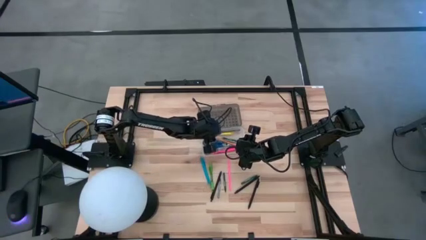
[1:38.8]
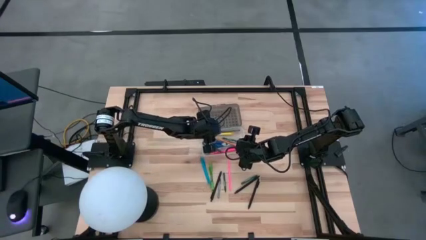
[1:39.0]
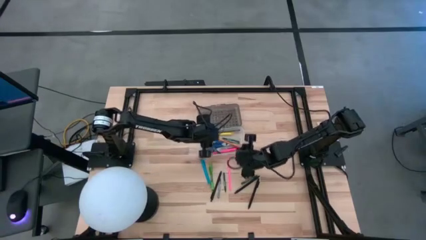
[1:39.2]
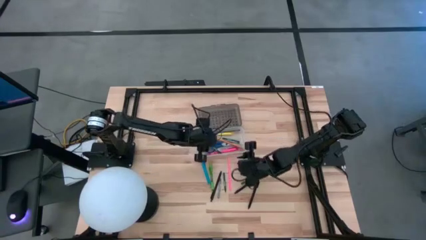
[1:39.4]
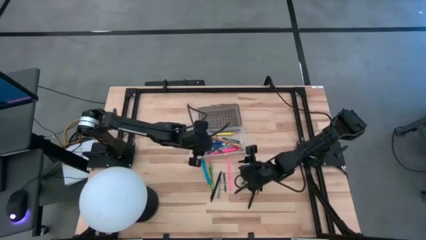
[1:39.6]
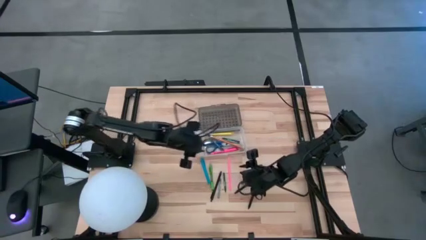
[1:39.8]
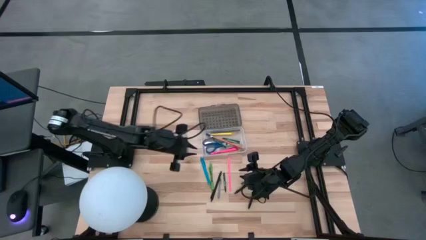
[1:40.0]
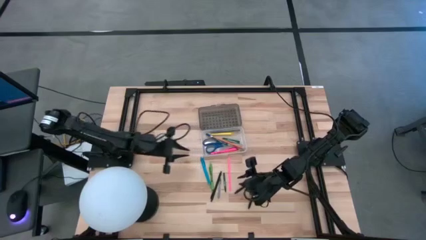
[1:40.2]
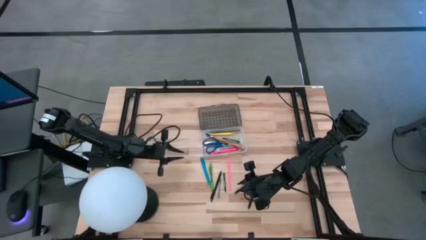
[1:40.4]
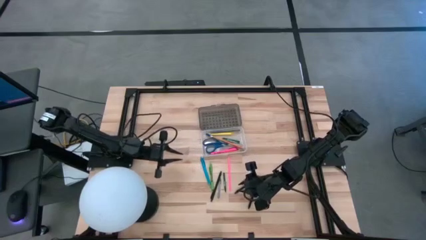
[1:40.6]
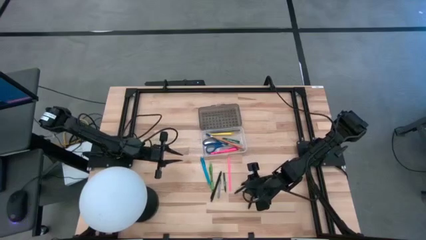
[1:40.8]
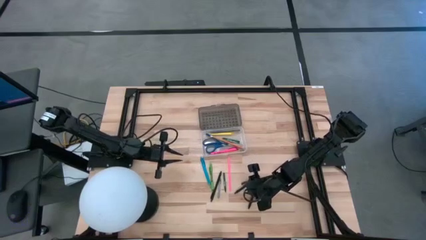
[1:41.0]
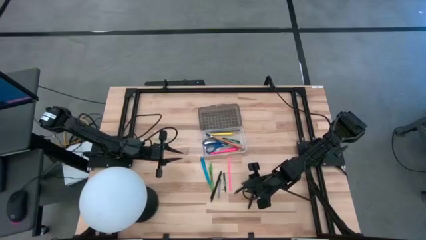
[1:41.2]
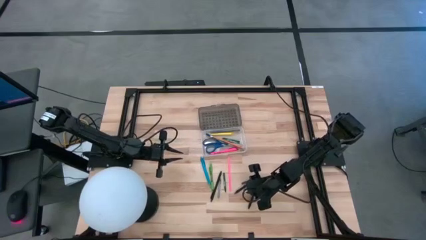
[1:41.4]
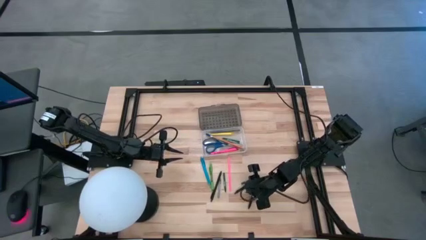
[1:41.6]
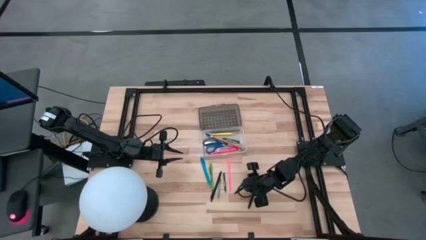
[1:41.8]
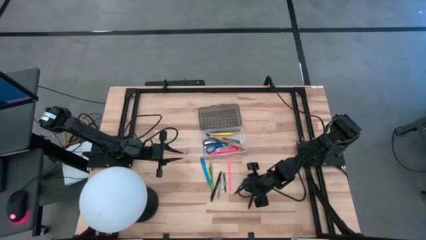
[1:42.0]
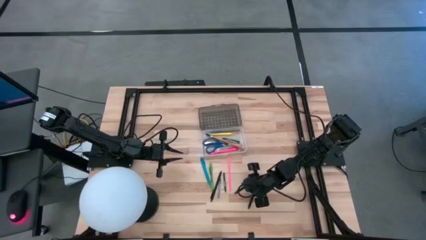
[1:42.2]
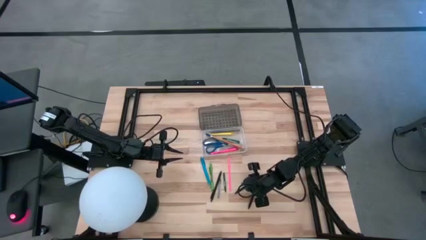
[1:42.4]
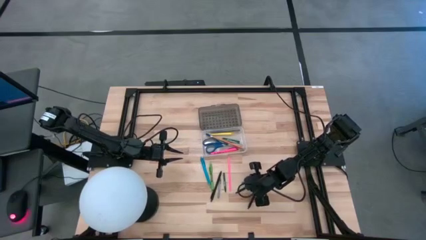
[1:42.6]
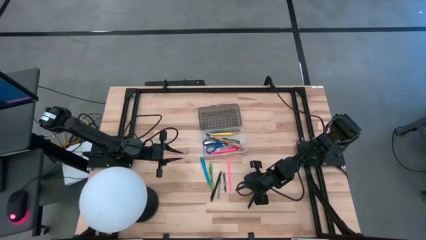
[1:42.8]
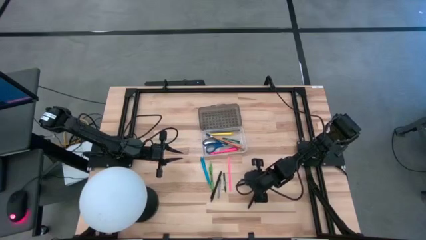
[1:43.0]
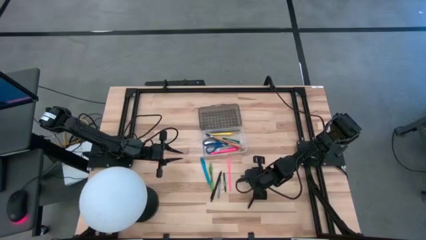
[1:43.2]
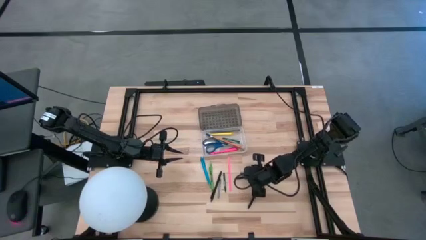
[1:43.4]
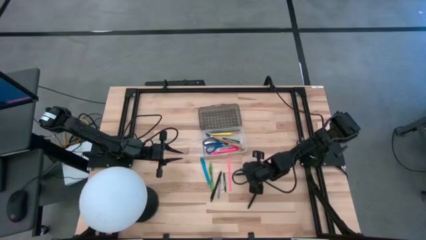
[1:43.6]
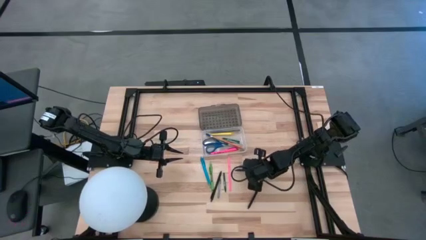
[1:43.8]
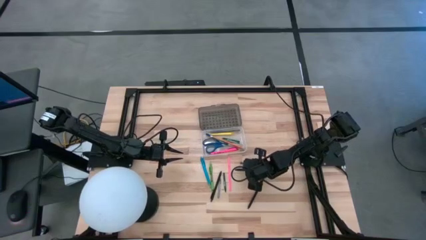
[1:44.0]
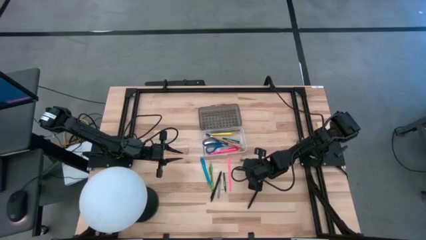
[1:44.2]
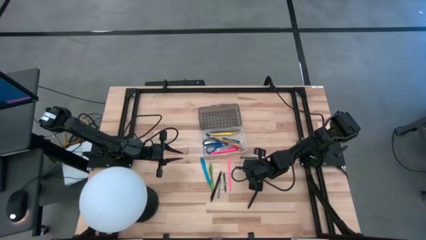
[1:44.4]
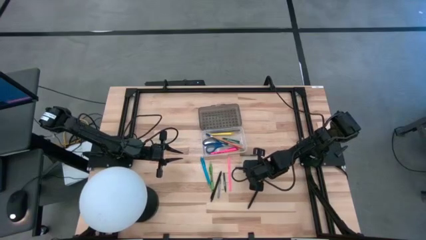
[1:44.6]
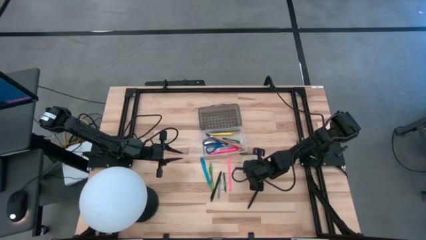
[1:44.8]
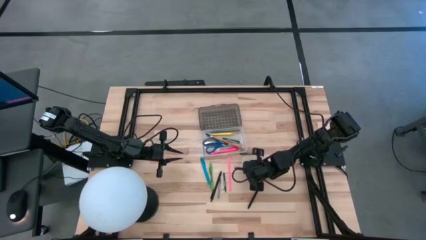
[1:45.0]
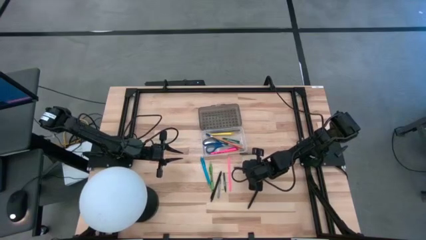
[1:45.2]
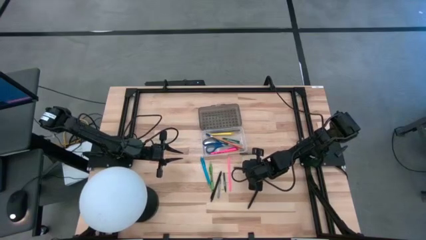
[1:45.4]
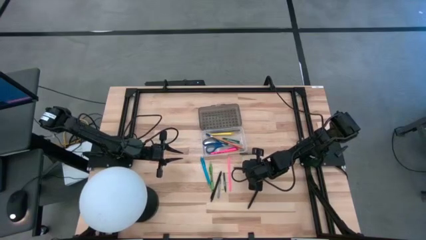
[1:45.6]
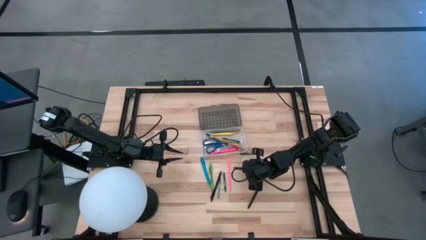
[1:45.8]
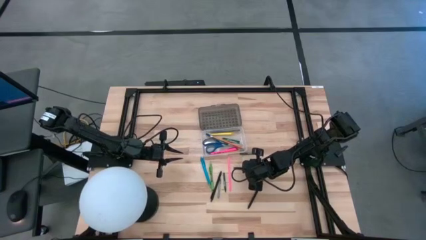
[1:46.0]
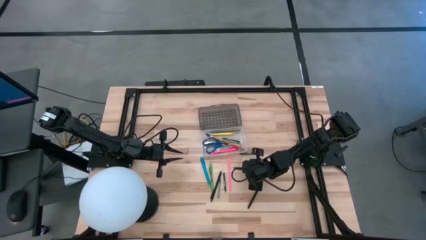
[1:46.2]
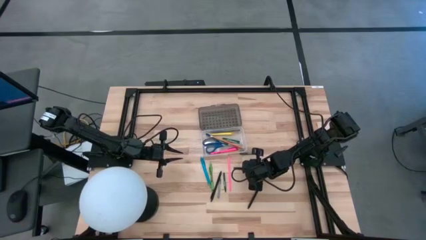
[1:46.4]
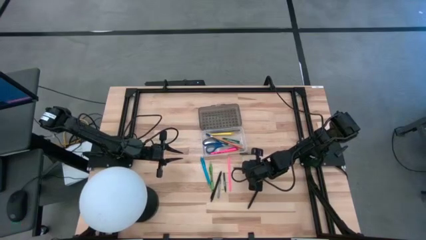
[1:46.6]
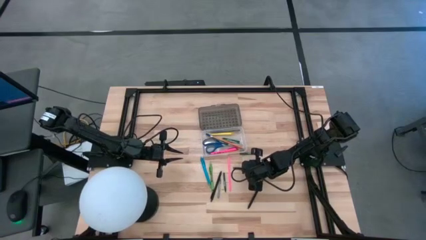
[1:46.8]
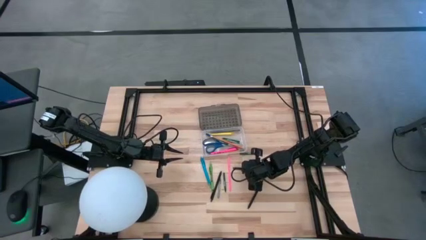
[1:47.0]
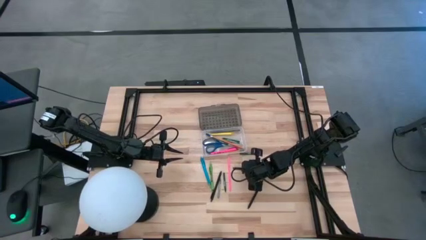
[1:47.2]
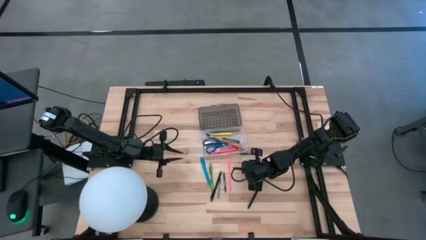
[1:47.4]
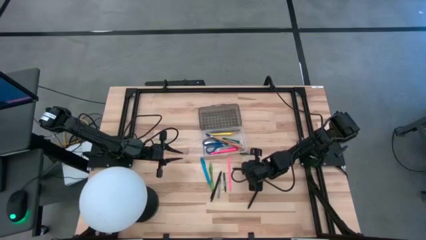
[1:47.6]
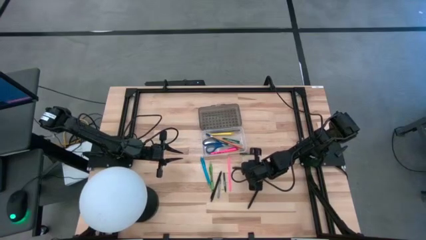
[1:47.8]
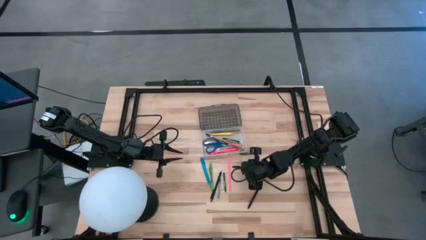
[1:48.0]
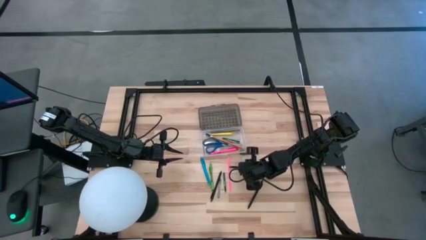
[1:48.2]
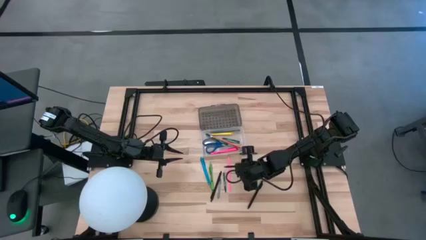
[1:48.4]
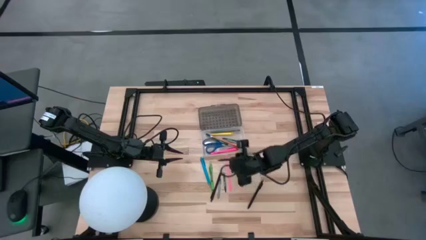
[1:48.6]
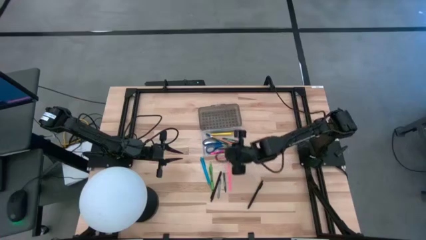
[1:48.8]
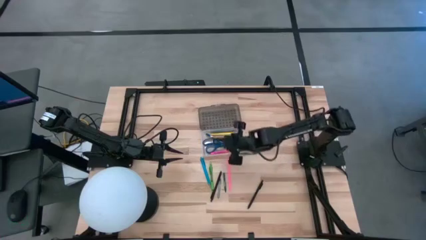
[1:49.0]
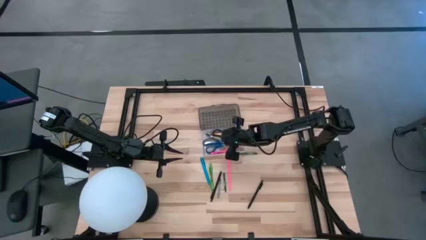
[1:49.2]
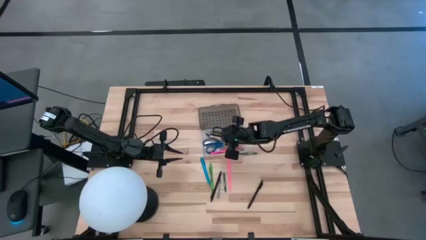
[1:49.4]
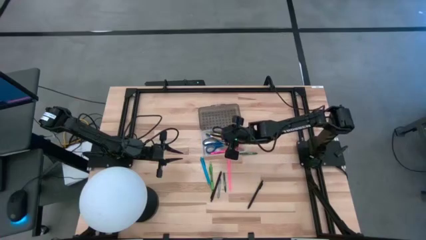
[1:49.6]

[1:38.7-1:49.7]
Task: Pick & place school supplies into a supply box
Put the black pen into the supply box

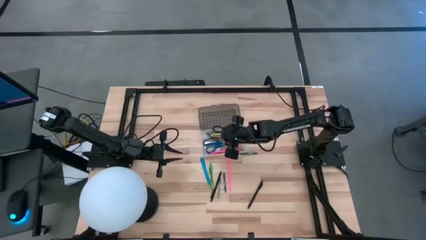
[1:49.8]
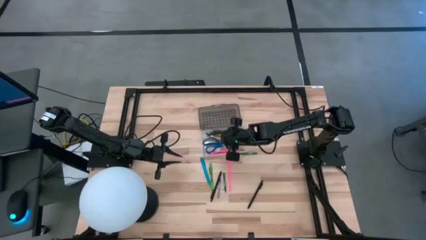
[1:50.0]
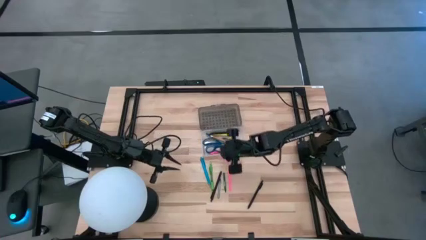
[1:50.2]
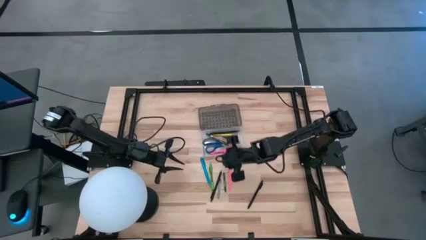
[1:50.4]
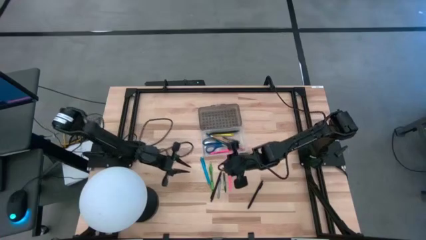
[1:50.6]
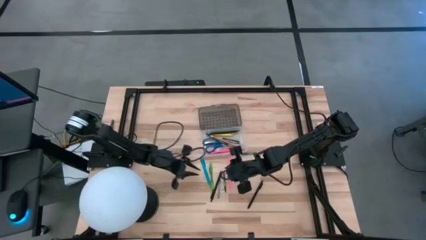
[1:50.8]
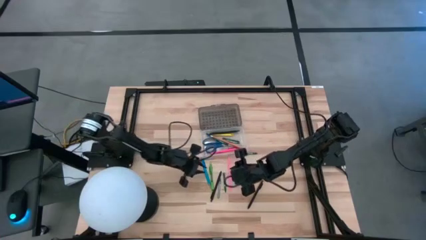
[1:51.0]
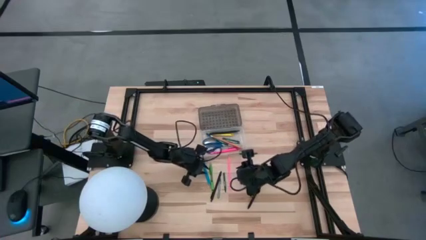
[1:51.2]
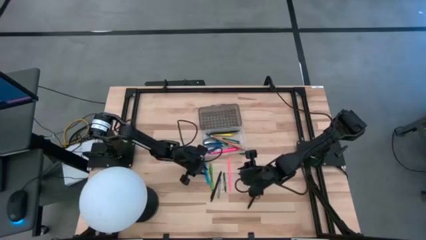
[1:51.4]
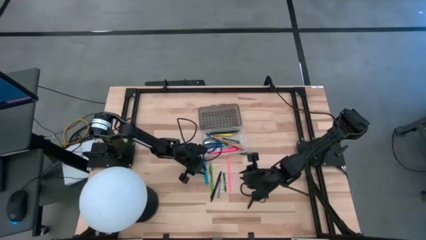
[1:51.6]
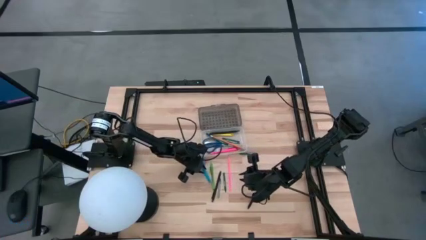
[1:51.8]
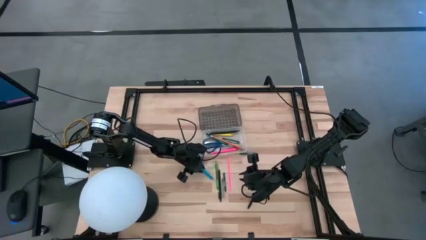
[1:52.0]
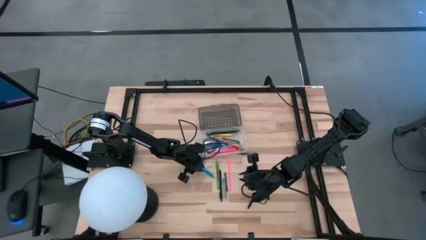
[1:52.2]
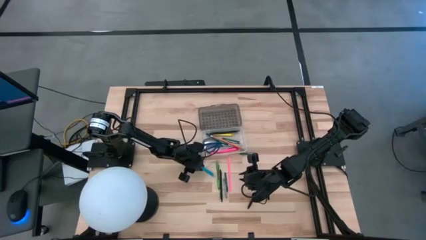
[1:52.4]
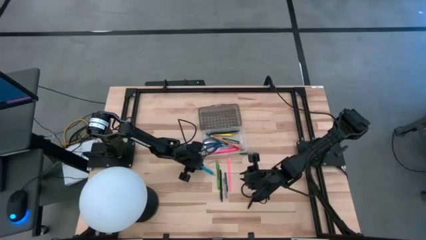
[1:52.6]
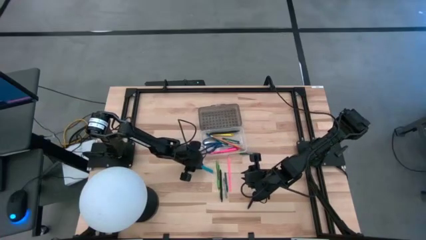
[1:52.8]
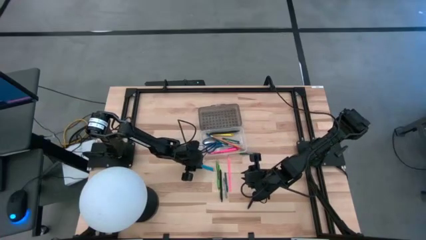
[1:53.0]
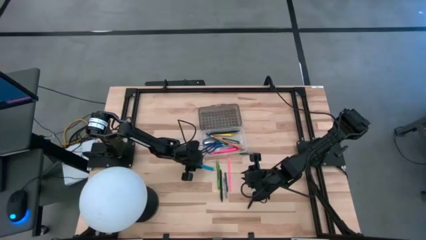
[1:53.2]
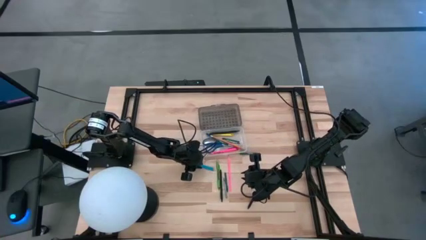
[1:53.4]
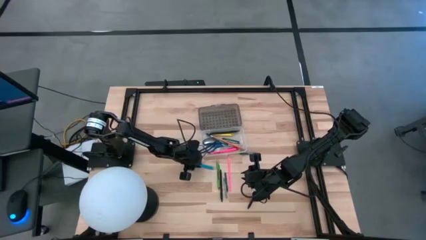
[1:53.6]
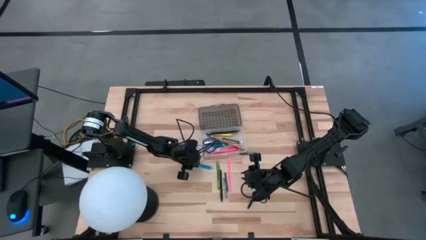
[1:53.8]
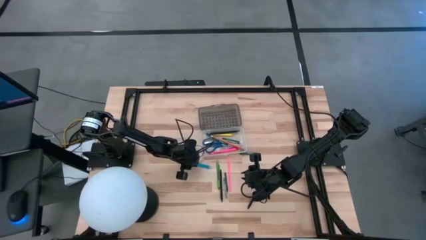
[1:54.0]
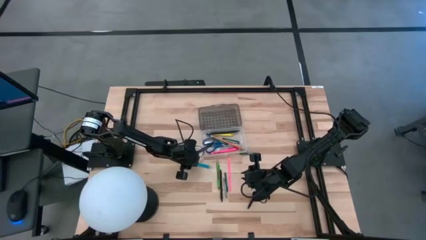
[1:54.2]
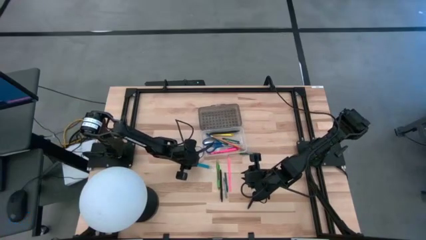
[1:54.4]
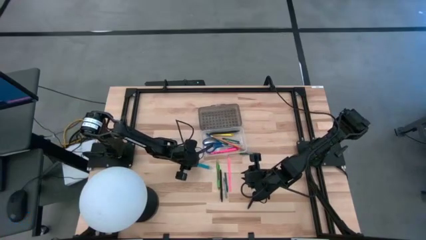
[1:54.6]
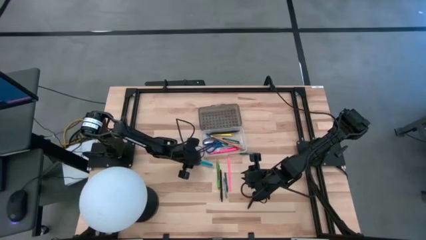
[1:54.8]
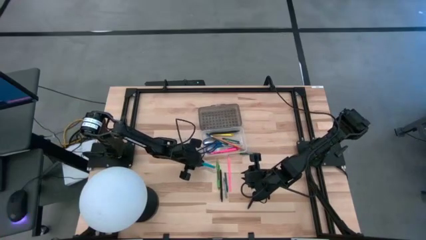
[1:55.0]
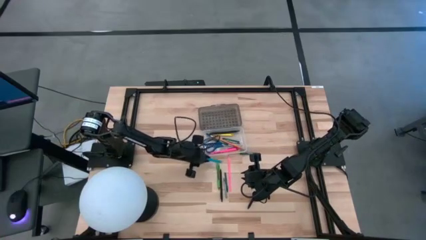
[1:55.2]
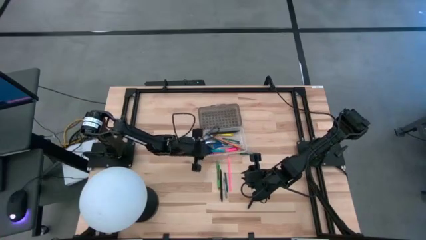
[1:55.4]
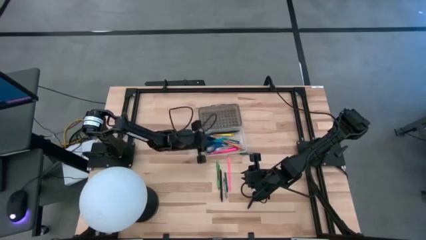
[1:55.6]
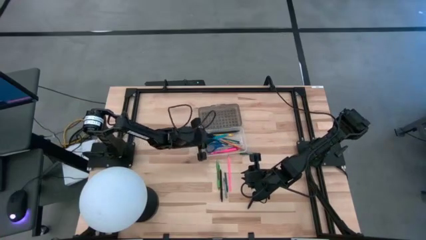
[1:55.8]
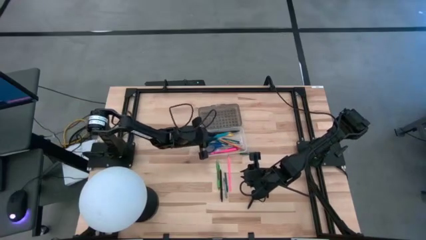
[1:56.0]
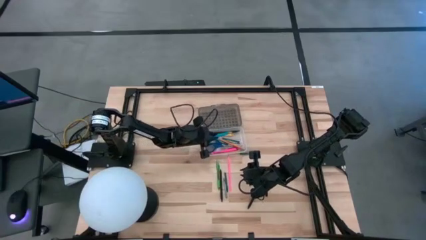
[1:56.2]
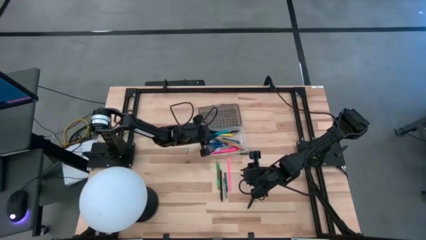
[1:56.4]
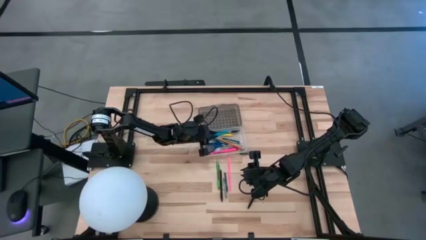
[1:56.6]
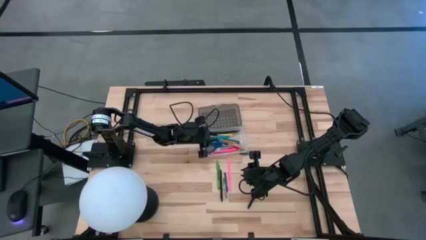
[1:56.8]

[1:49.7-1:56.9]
Put the light blue pen into the supply box
